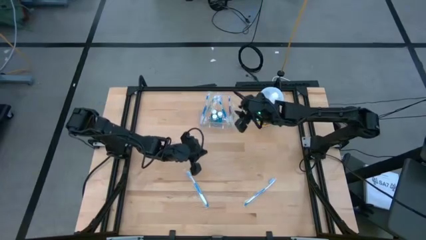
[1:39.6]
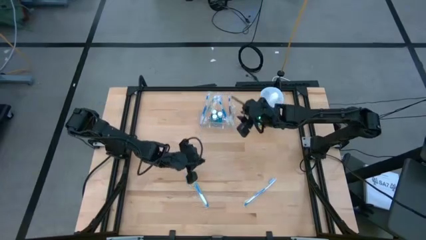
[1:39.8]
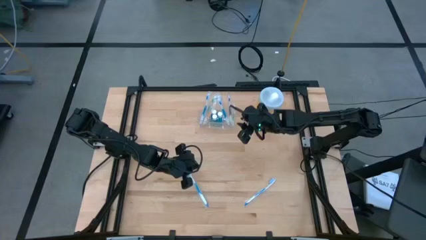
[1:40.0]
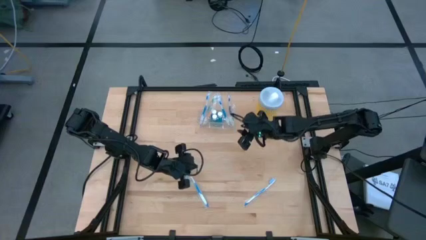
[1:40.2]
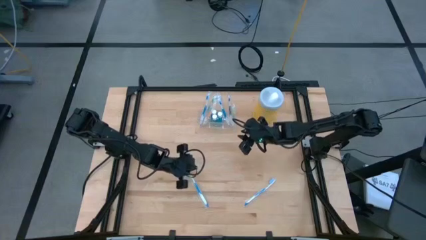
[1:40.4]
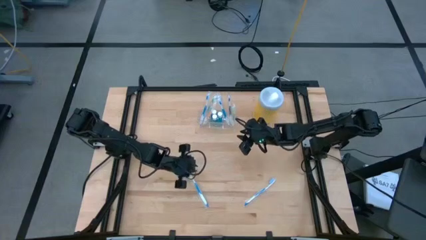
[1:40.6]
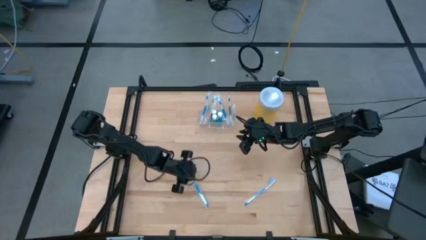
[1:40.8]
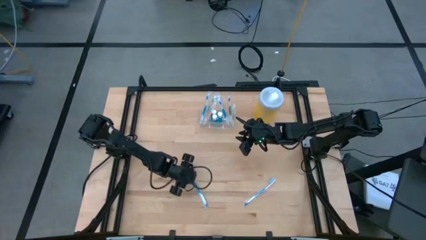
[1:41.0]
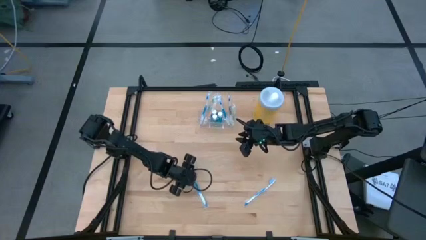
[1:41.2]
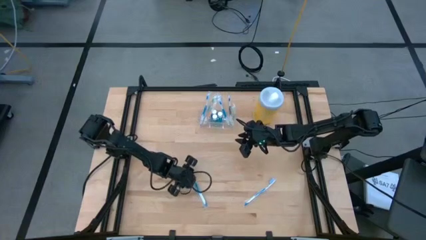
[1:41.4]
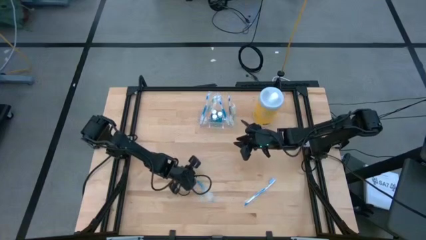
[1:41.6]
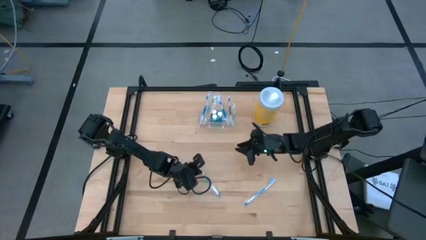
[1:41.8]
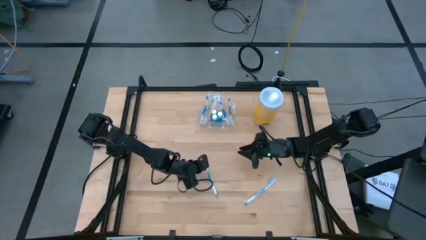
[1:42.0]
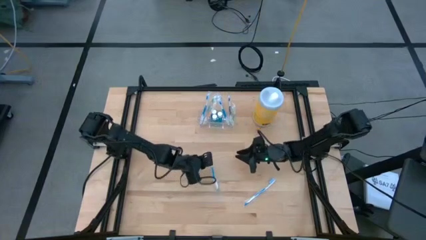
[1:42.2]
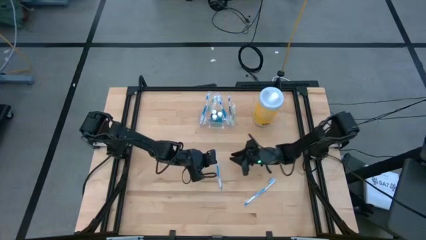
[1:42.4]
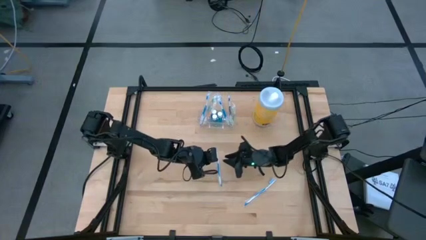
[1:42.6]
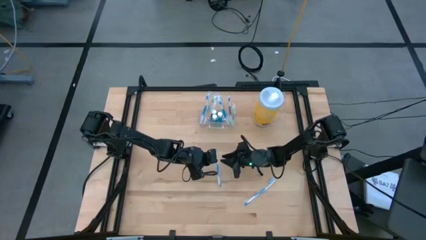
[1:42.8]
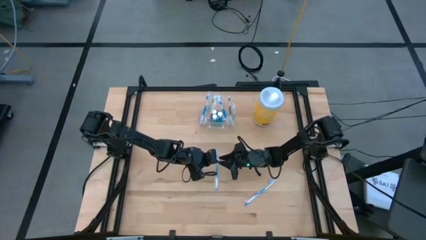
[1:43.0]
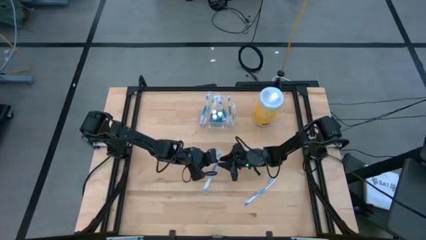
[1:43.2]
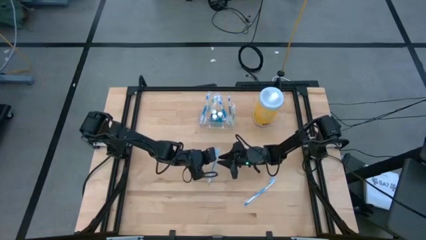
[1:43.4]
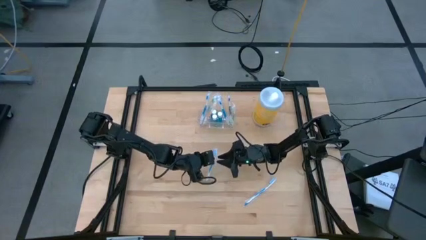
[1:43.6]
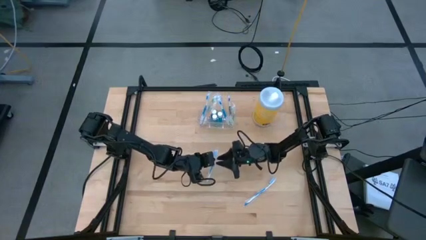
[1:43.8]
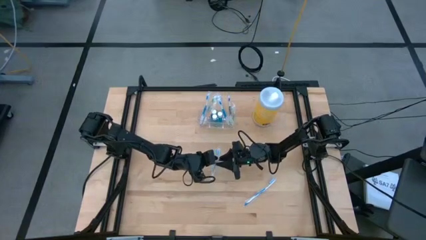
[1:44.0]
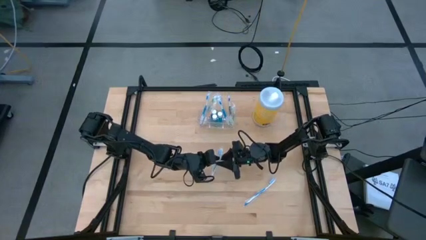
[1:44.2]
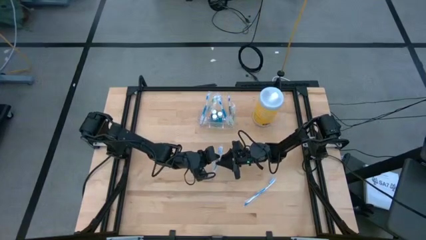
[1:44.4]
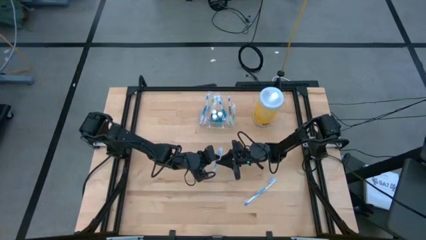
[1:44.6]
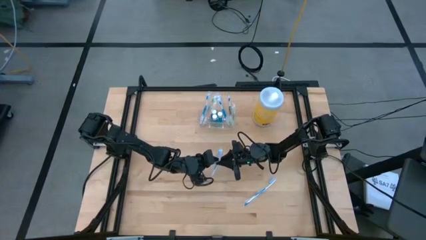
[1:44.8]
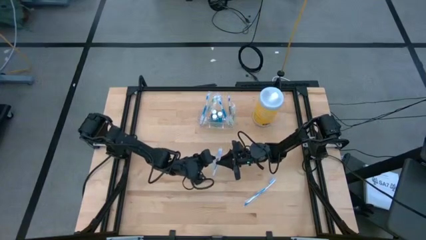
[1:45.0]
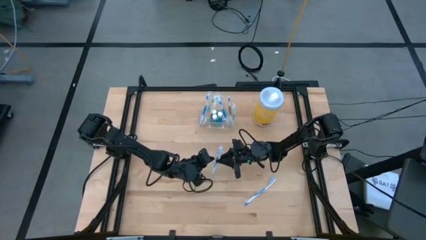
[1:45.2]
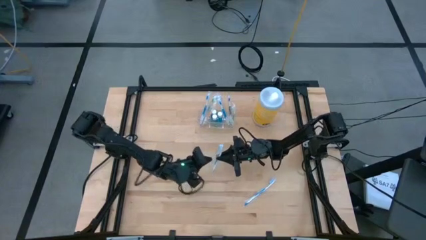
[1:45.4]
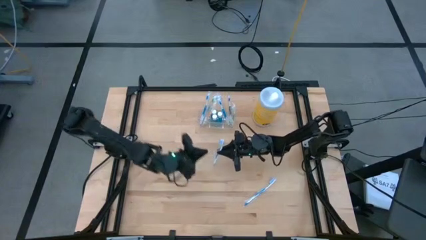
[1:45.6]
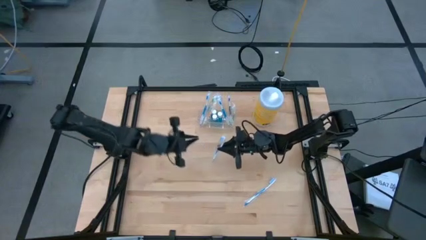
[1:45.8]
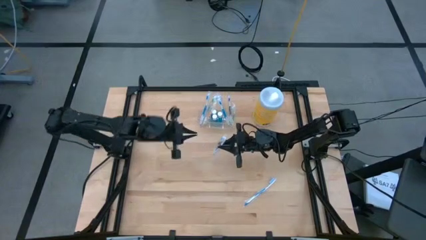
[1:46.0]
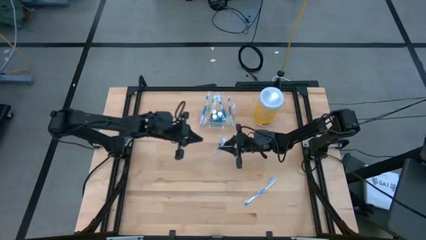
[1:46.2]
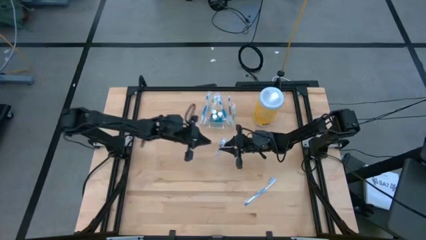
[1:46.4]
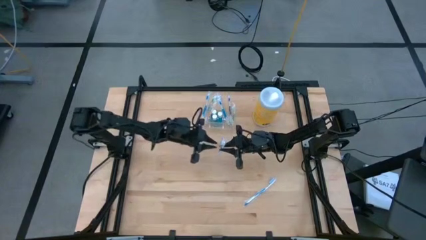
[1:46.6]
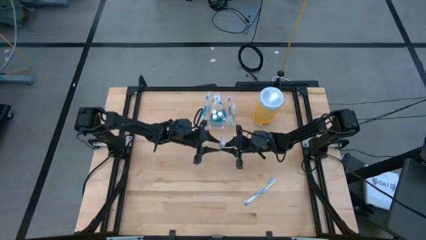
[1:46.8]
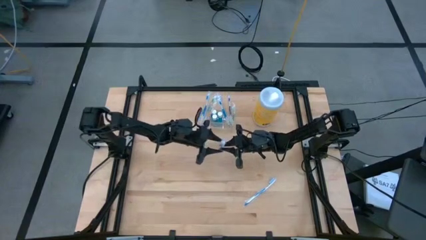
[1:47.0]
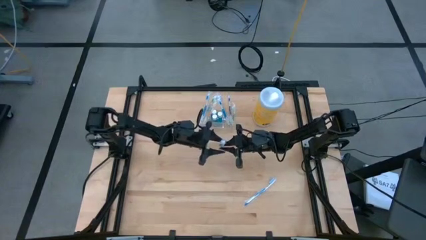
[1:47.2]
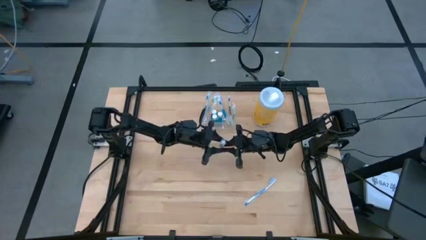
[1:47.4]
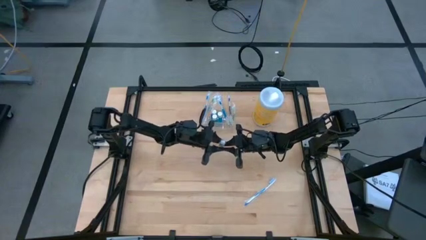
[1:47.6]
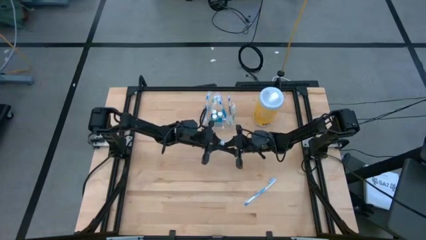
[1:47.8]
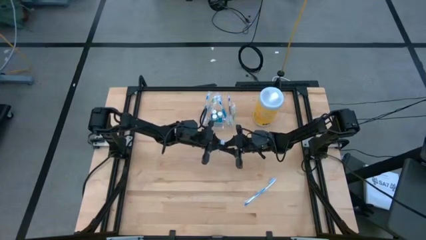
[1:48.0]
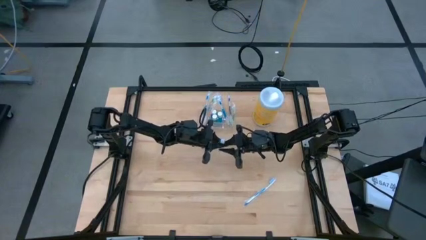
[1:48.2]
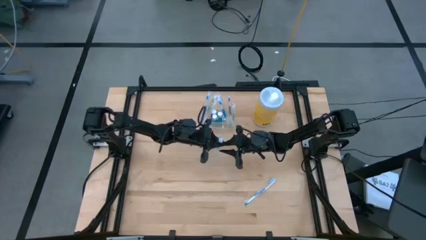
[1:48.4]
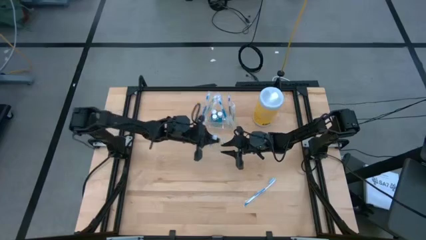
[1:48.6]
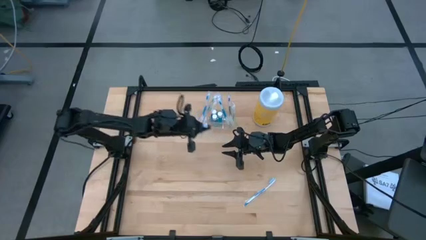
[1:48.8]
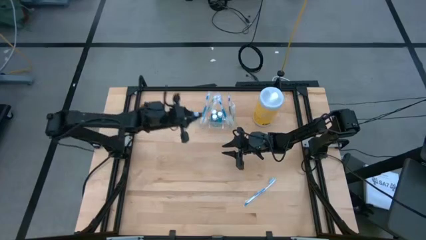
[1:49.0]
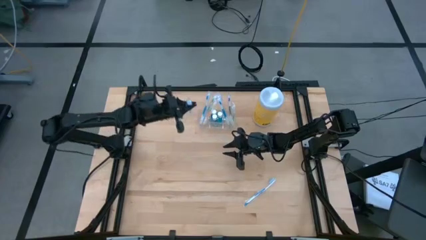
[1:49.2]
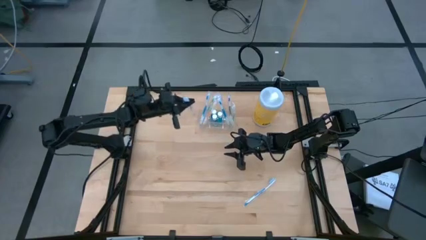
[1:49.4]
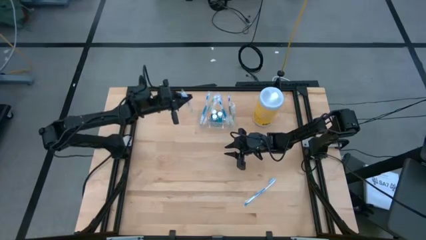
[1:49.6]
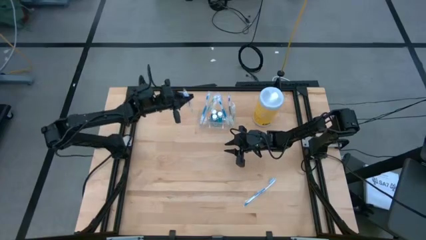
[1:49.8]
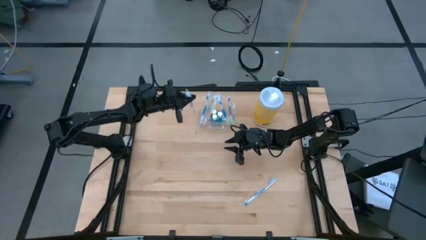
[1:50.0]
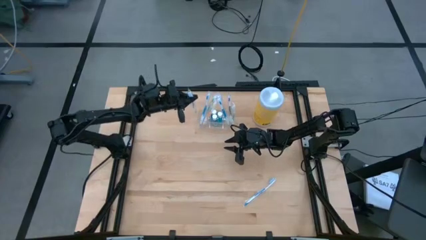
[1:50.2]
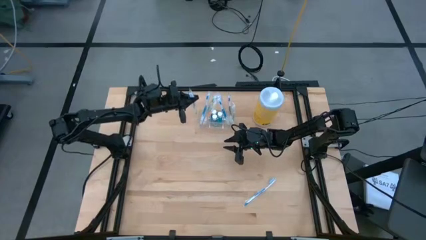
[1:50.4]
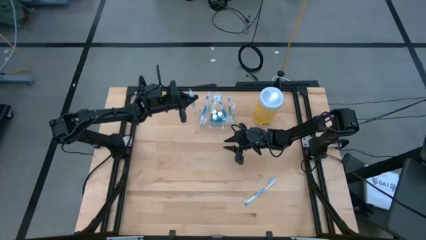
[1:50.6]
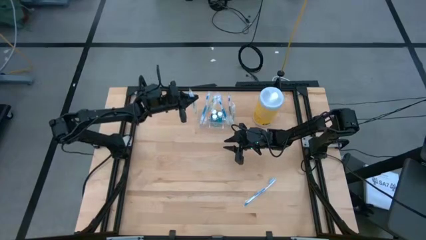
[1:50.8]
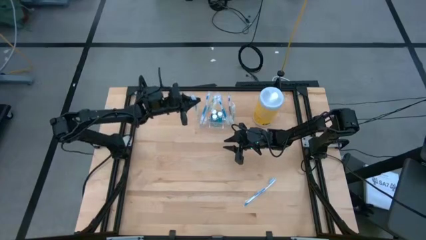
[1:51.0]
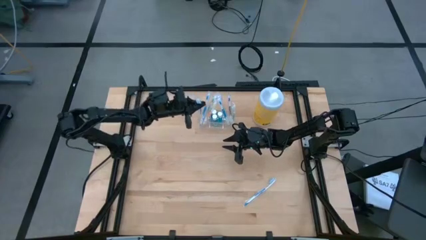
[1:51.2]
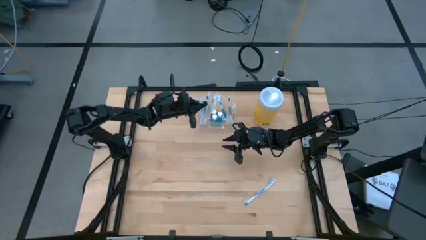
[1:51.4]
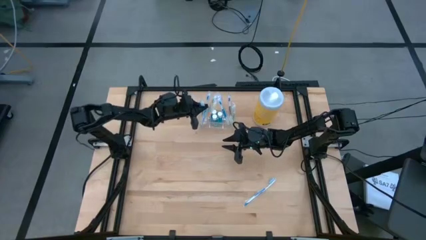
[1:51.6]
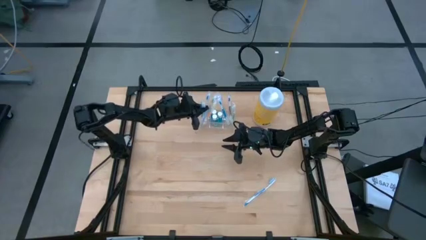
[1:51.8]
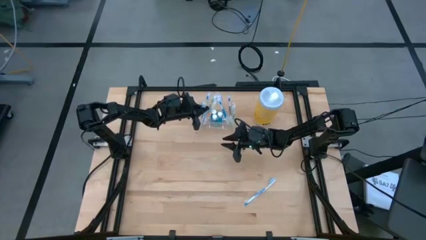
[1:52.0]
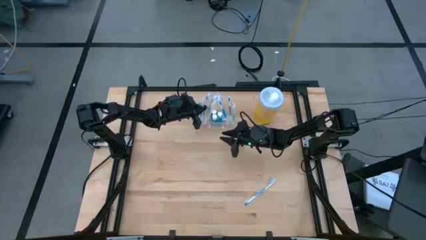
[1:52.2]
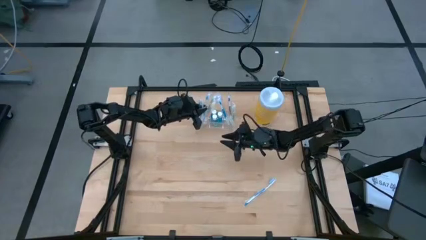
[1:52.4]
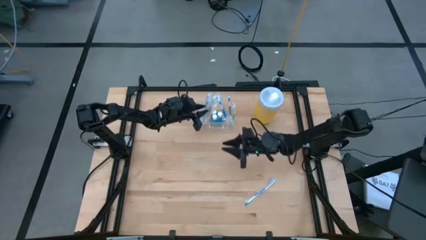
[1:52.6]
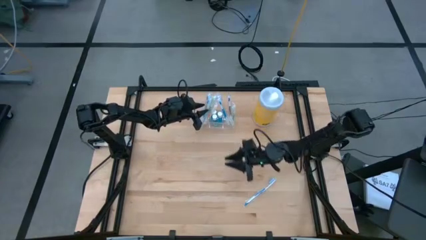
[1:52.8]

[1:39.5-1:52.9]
Task: Pick & Place toothbrushing station
Put the blue toothbrush into the left compartment of the transparent organizer

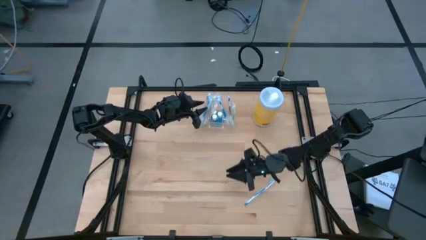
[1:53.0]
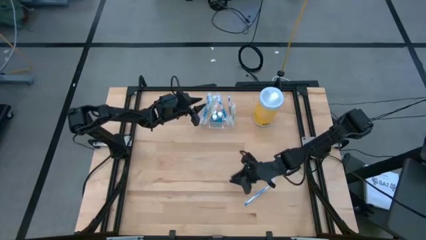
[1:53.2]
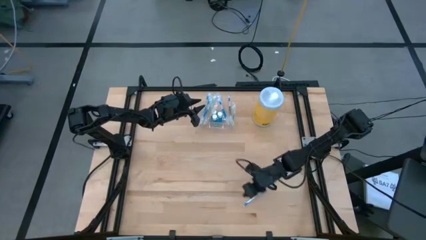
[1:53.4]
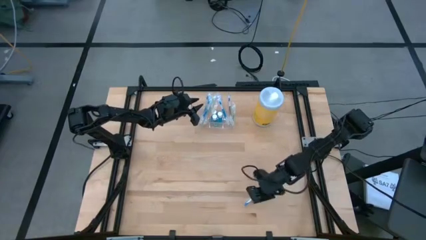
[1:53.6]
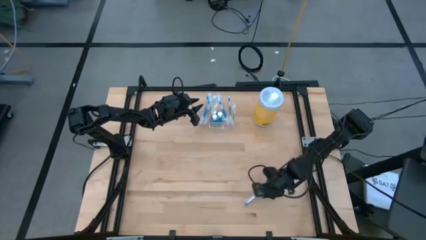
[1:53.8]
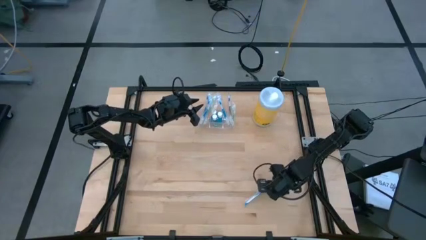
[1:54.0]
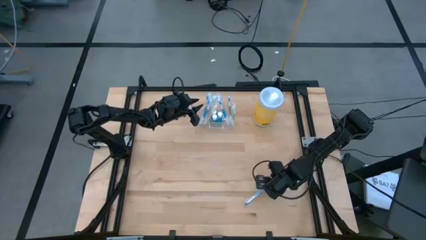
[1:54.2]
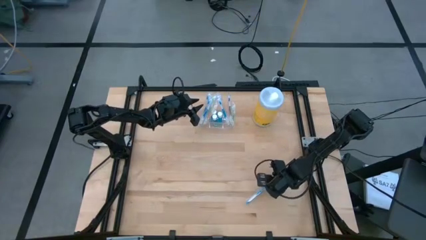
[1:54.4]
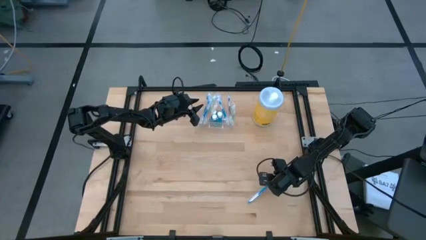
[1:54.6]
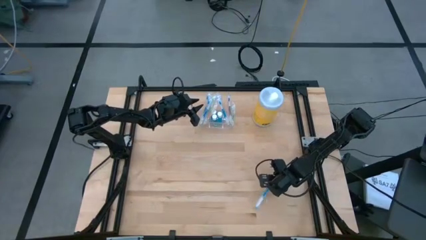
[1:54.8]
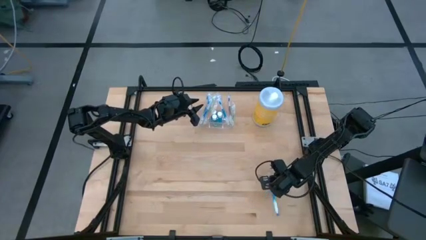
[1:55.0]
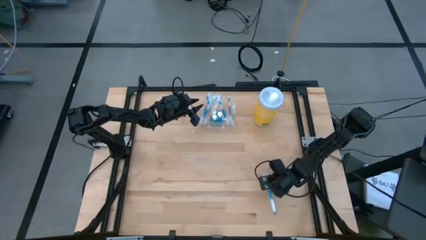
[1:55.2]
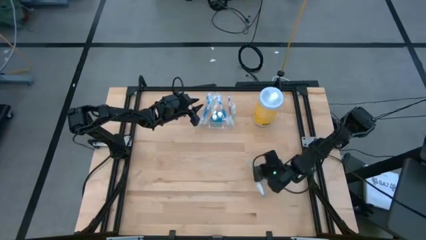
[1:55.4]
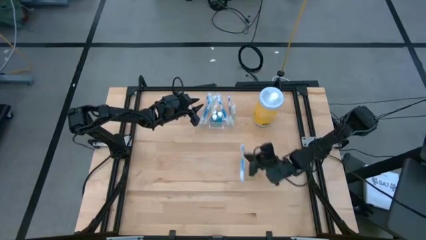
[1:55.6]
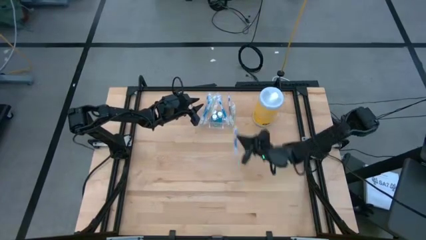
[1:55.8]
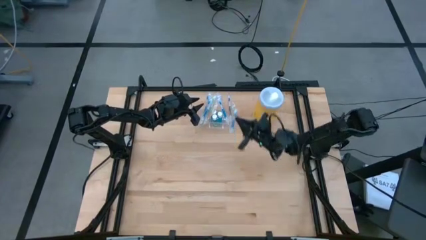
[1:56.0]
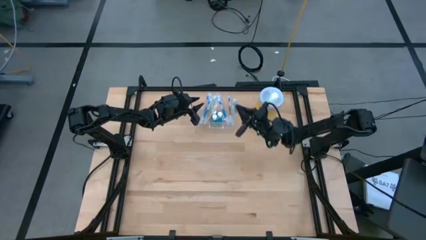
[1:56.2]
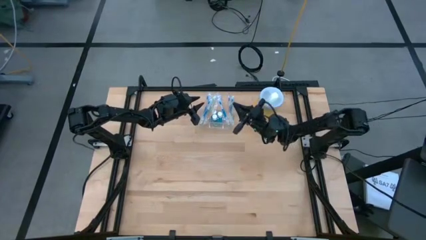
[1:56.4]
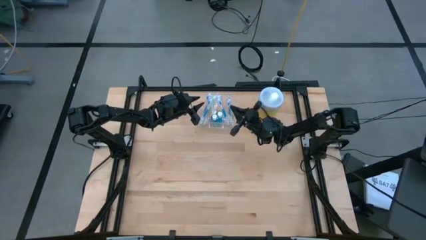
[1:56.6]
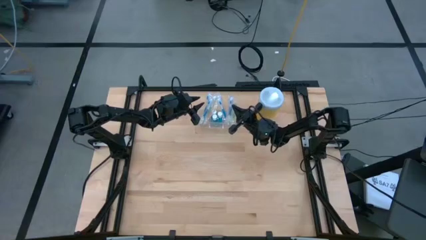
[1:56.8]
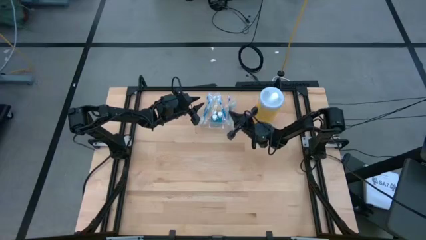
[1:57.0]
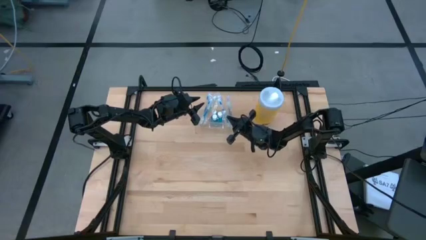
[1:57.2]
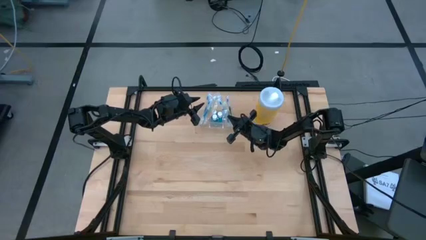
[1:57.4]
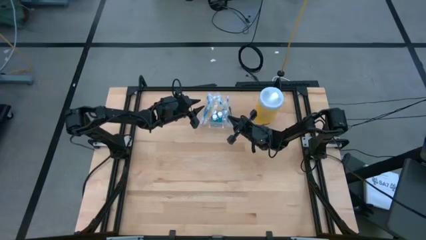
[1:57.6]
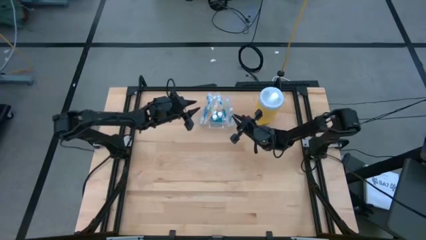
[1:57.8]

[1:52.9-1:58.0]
Put the blue toothbrush into the right compartment of the transparent organizer
